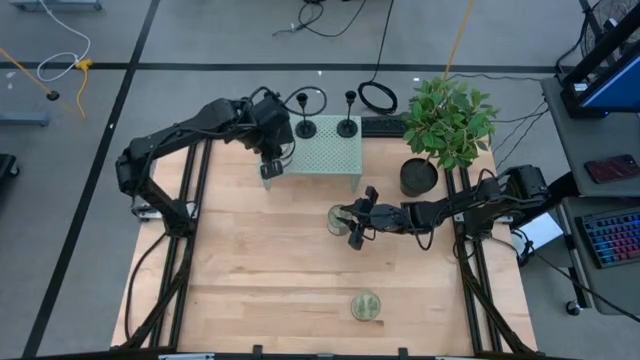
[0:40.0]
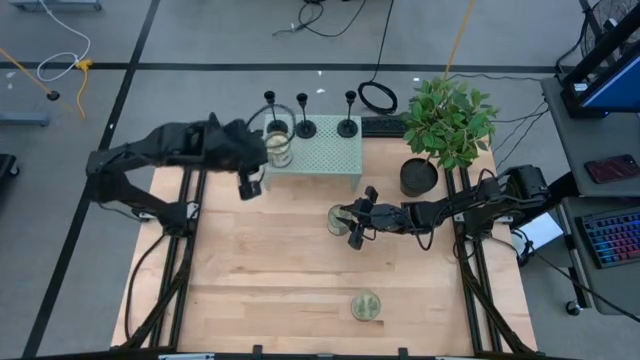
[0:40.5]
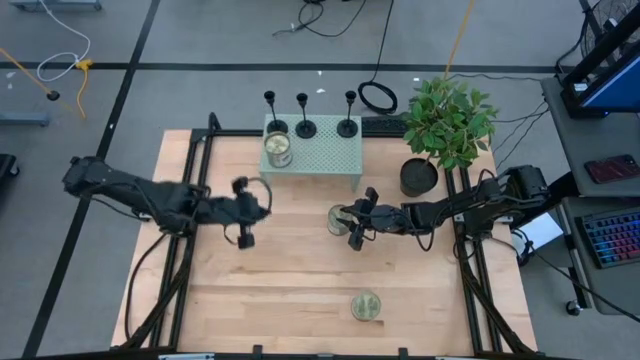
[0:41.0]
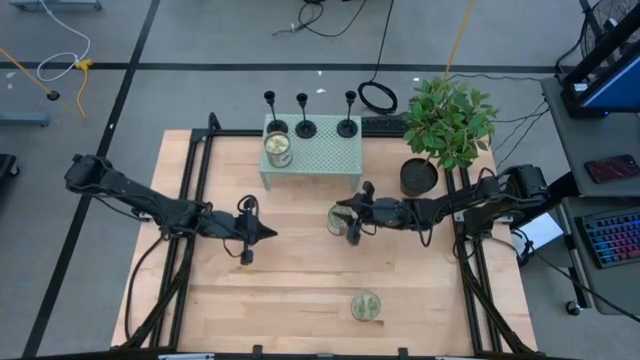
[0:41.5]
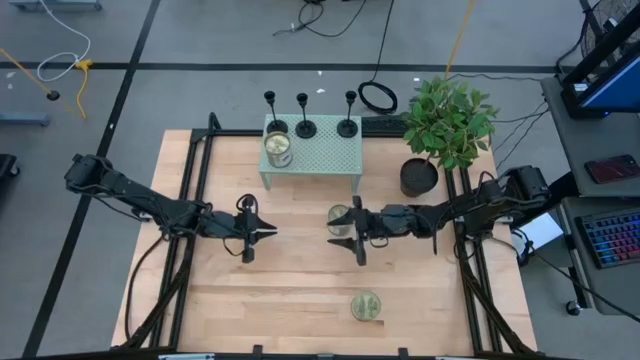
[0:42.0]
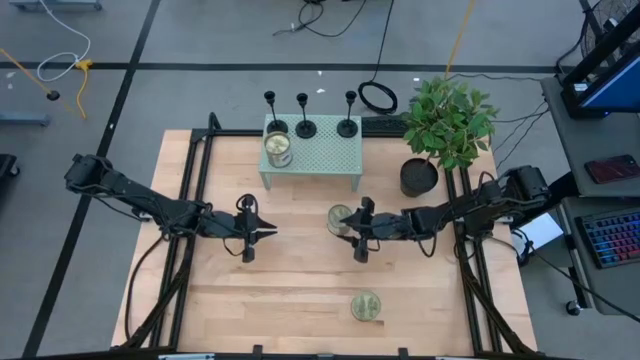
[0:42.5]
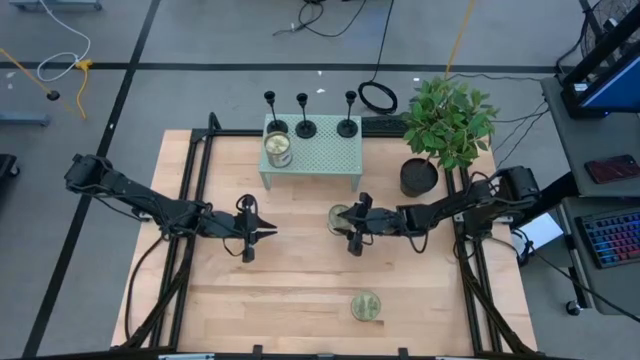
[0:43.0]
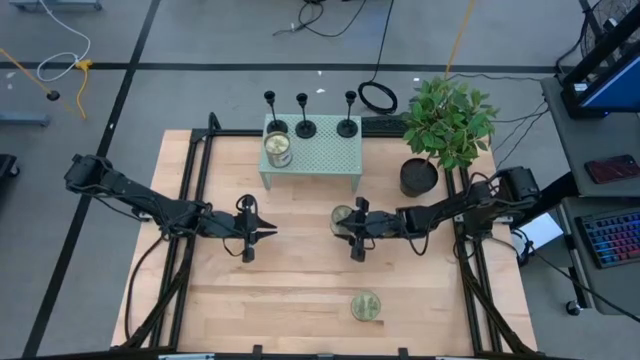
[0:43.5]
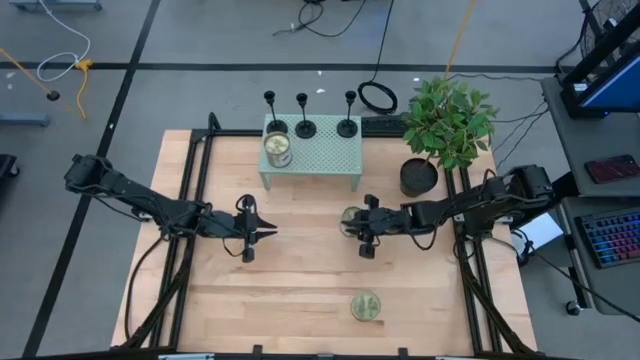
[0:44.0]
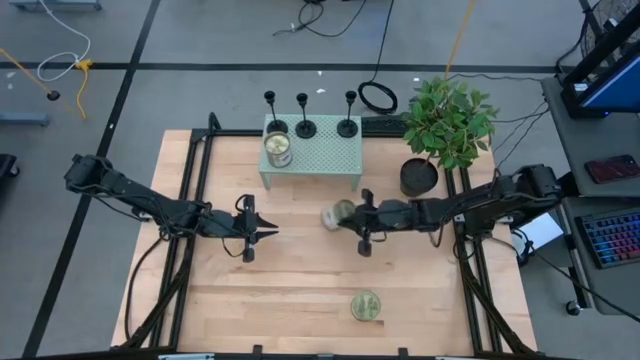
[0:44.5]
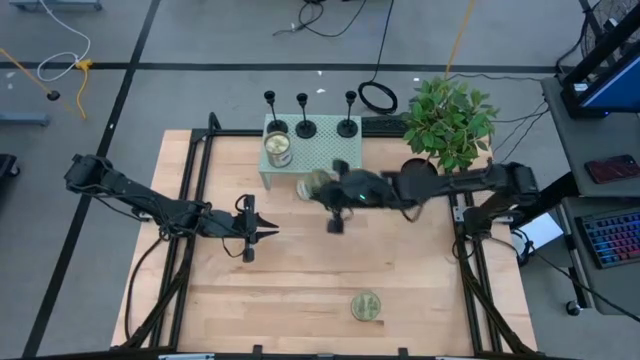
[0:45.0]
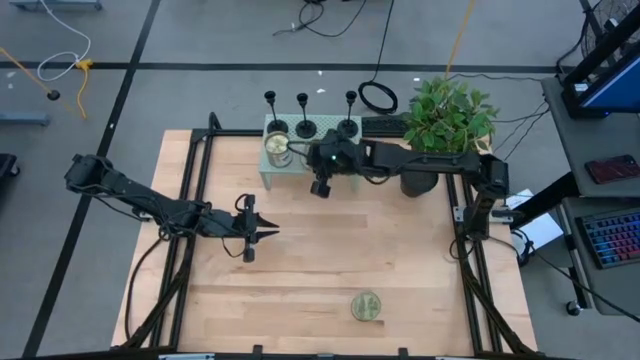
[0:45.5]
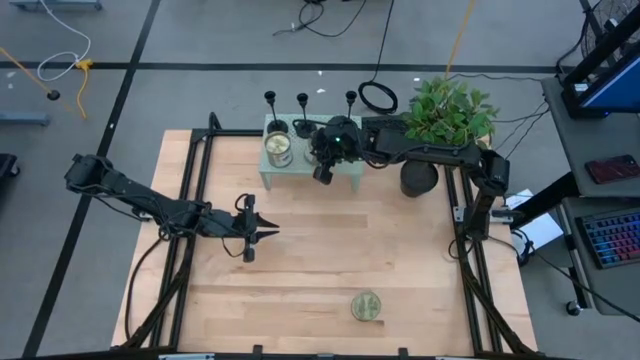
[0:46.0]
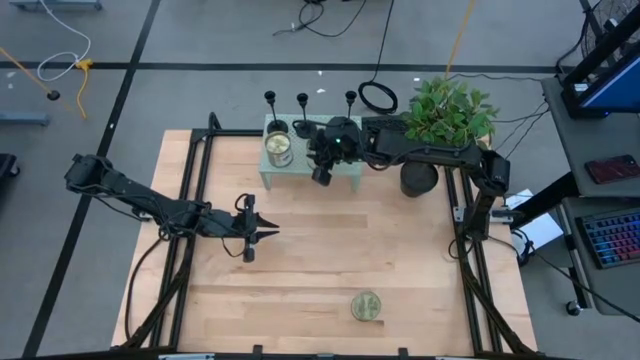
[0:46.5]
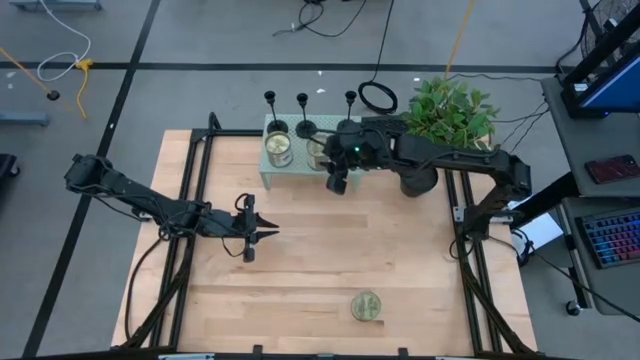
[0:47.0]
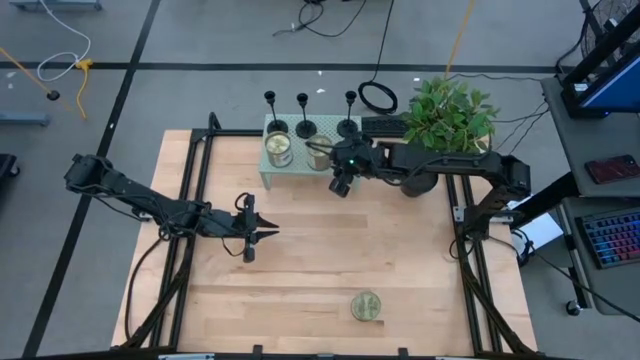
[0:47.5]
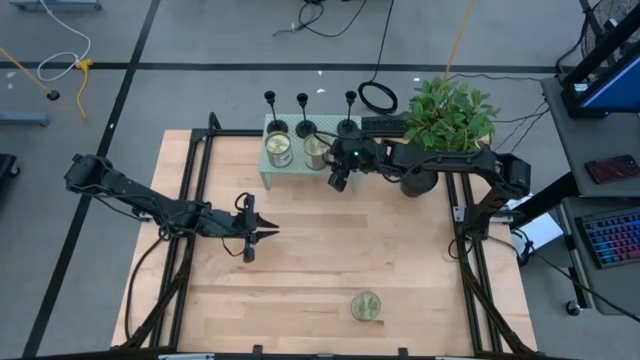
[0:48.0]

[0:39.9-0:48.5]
Task: Pick & Place candle stick holders
Put the top green scented candle on the shelf

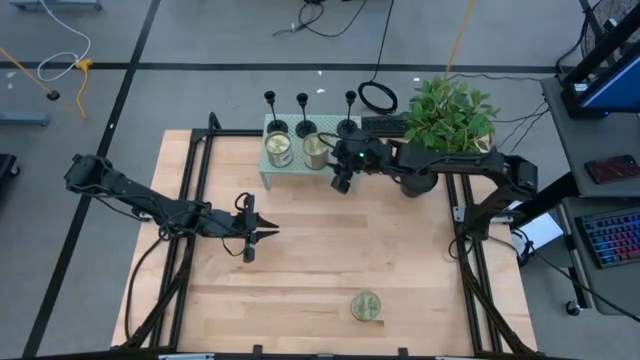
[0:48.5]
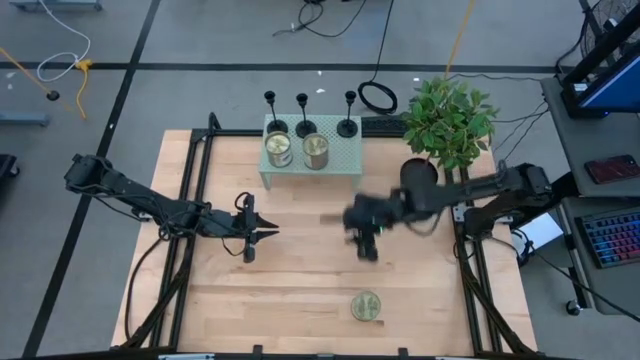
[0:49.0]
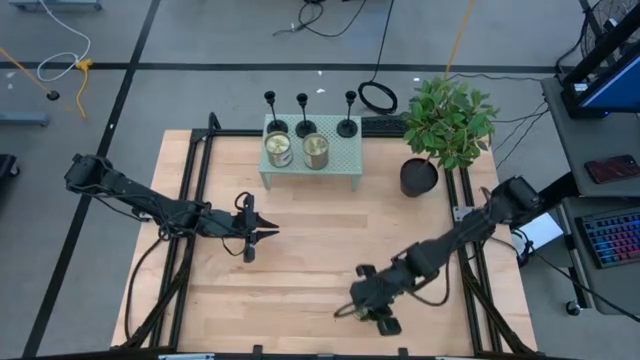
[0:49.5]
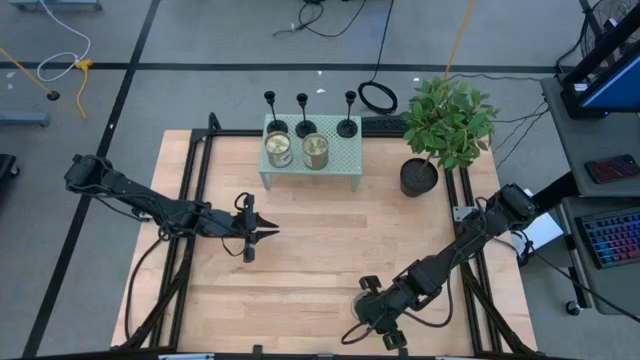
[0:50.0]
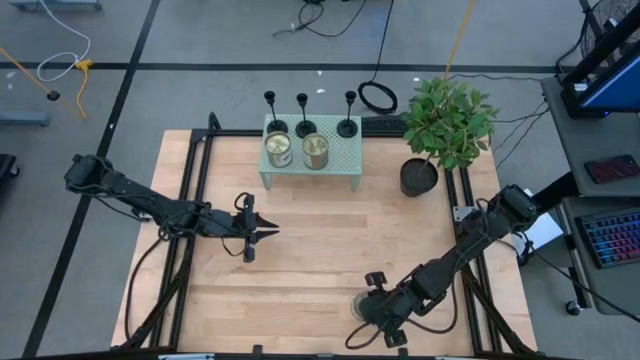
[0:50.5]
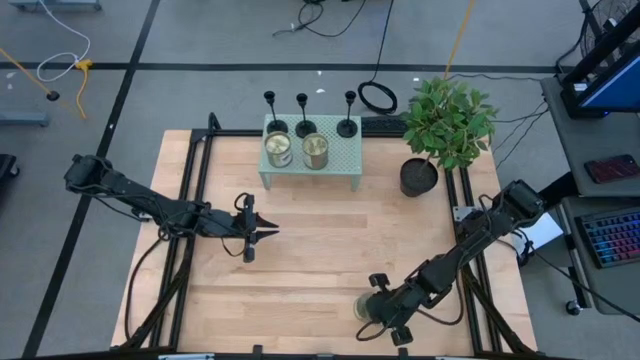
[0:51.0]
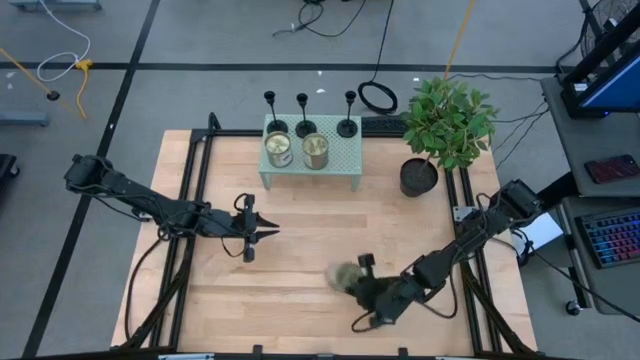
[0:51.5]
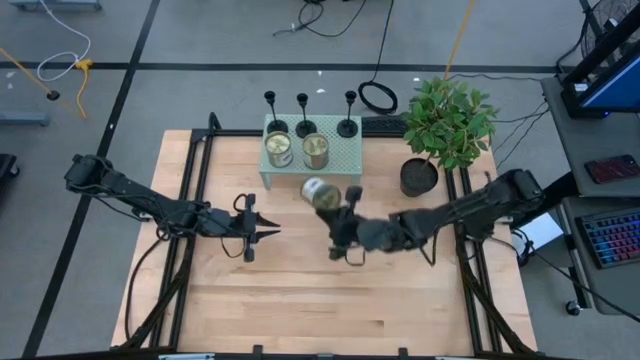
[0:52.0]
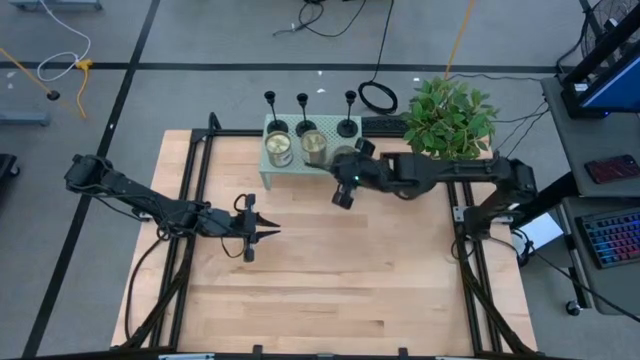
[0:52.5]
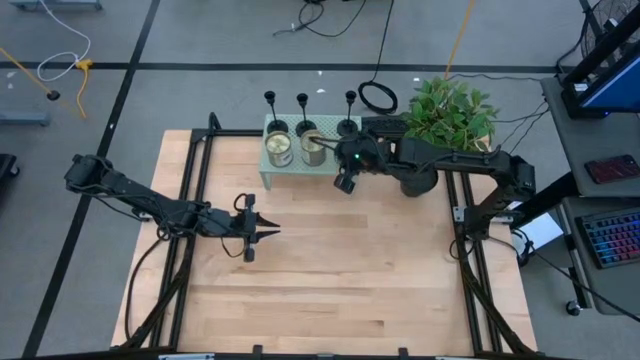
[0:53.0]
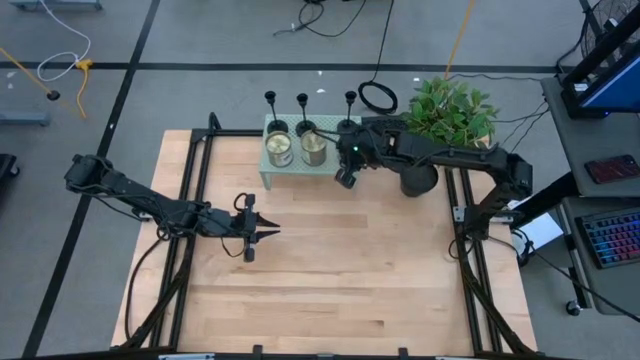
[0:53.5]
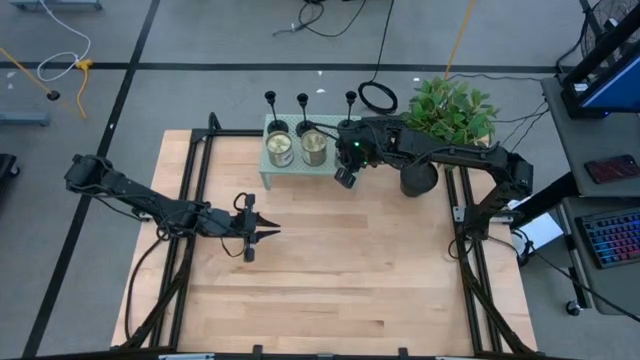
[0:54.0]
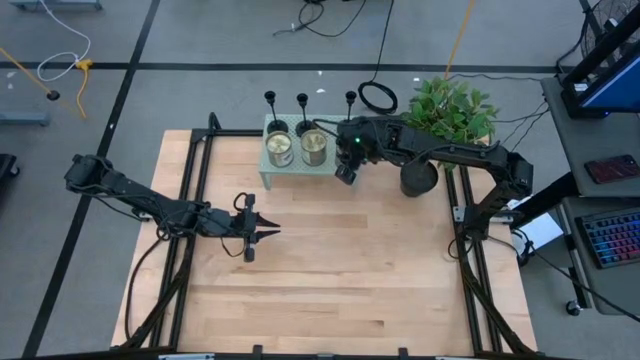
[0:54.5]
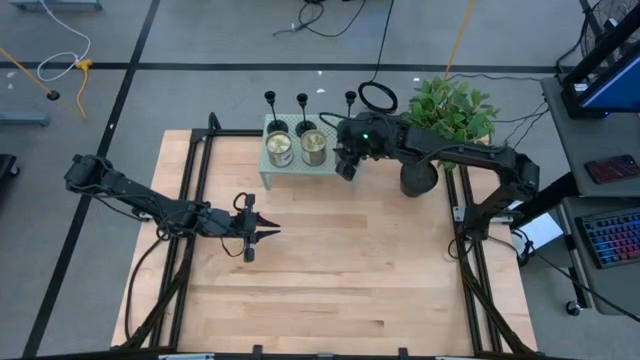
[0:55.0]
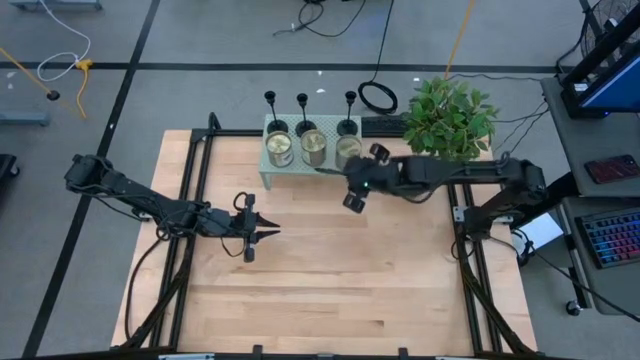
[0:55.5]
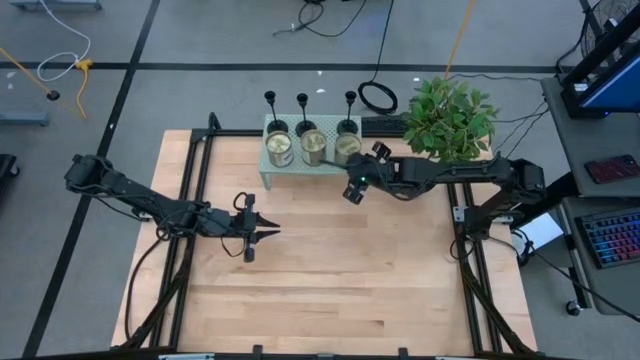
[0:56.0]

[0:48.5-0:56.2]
Put the scented candle on the shelf

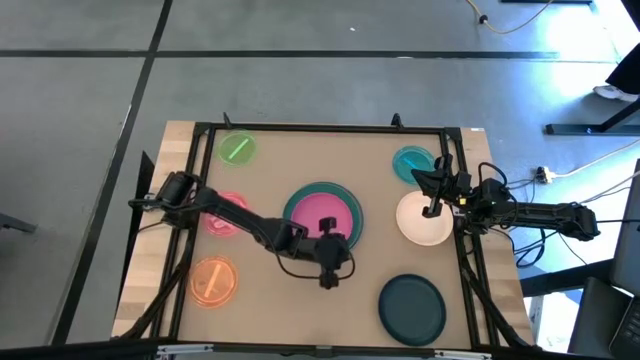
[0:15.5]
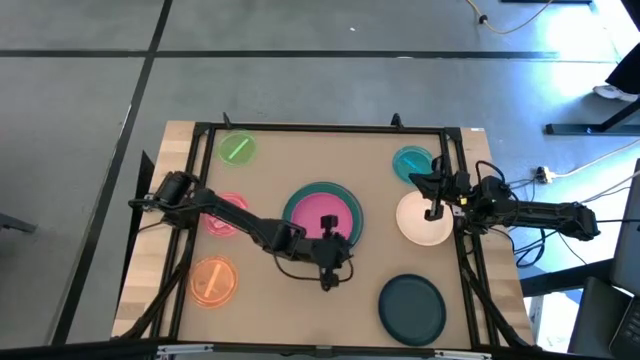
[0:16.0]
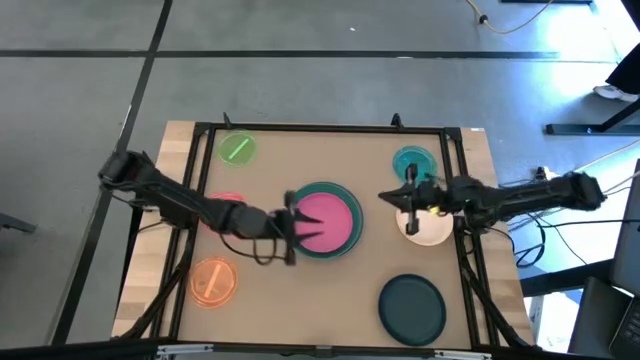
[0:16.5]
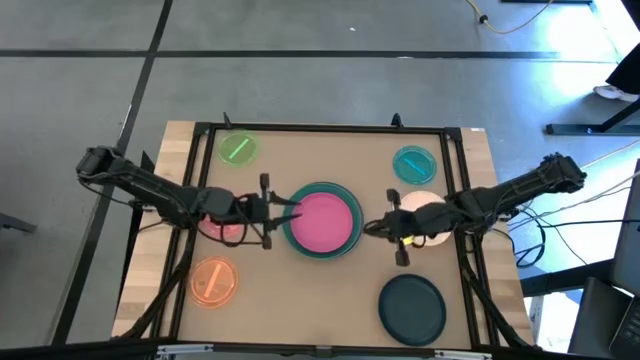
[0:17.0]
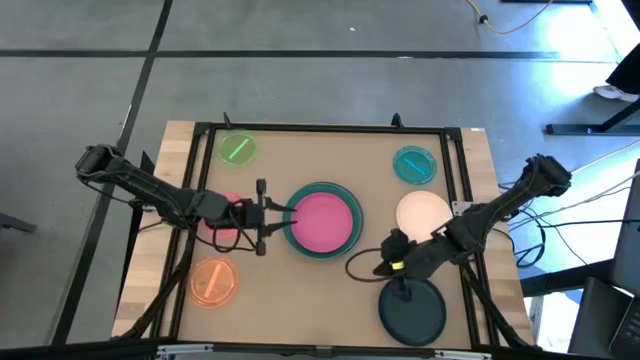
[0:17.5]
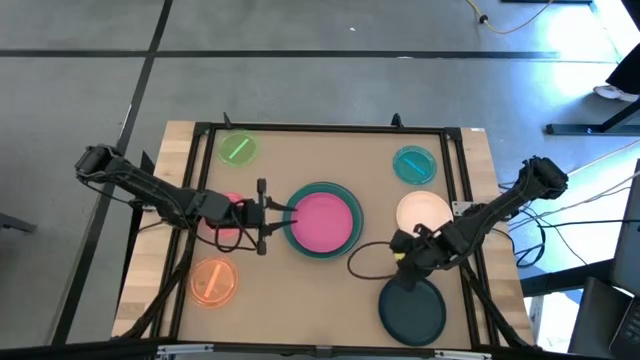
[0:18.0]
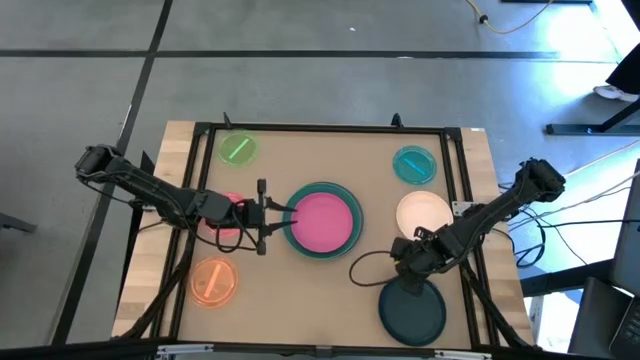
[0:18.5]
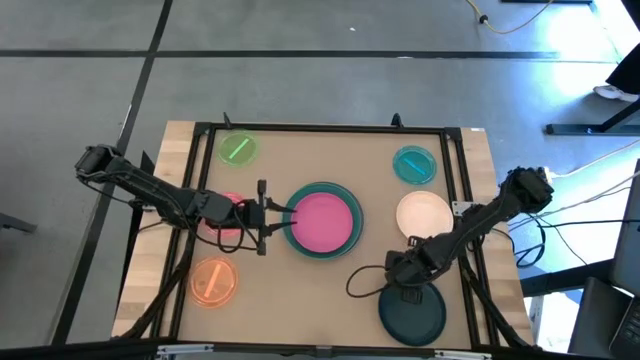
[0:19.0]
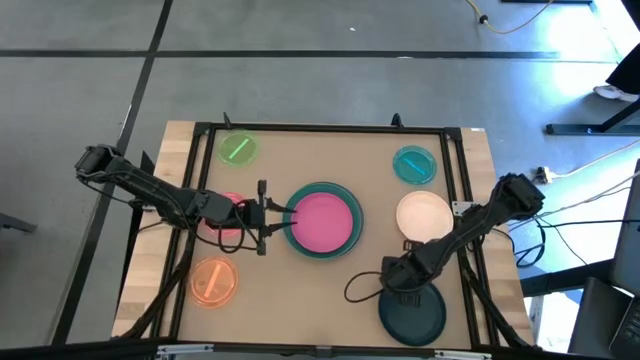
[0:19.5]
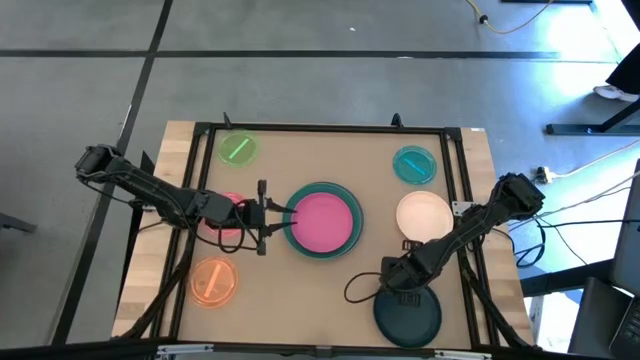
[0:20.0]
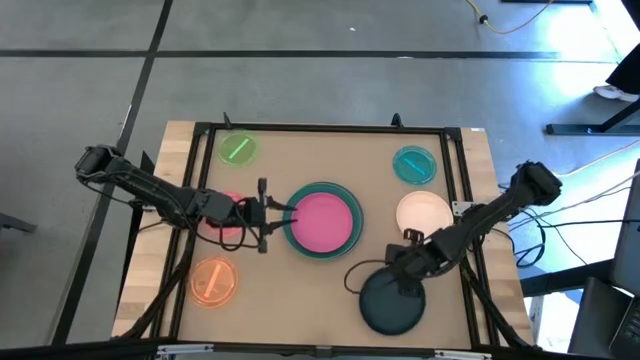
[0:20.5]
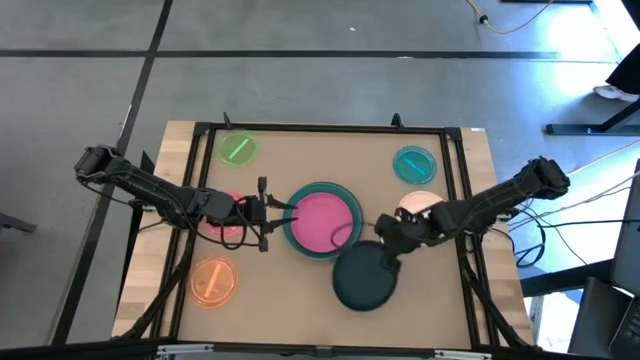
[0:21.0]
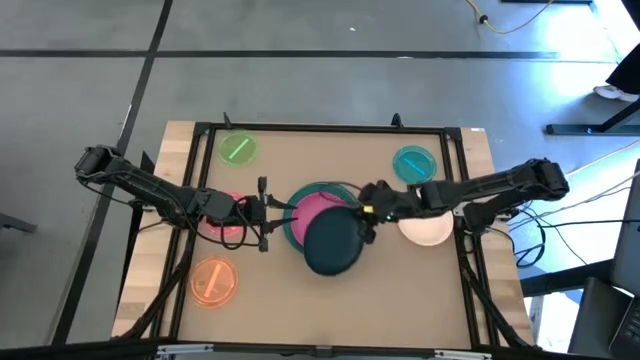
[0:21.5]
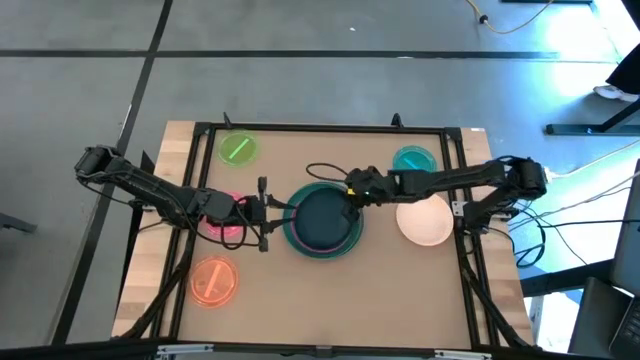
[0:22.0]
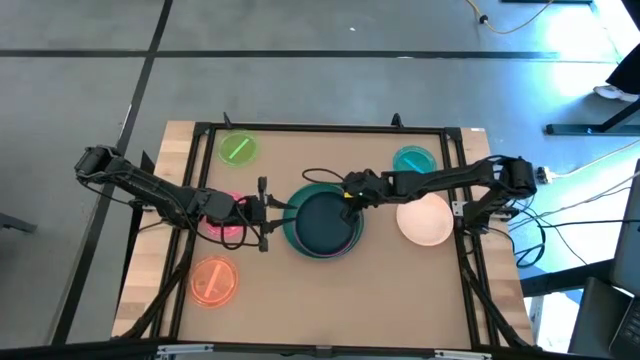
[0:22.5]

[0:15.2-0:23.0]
Task: Stack plastic plates
Stack the black plate on top of the pink plate
